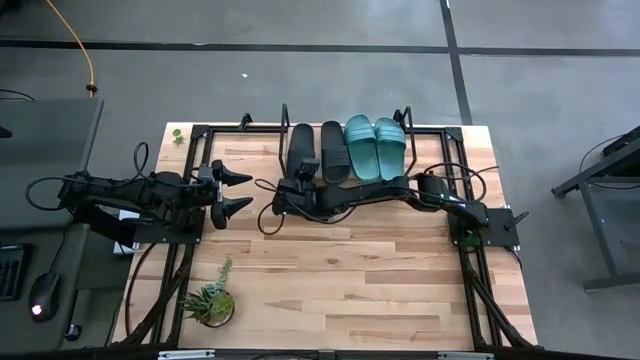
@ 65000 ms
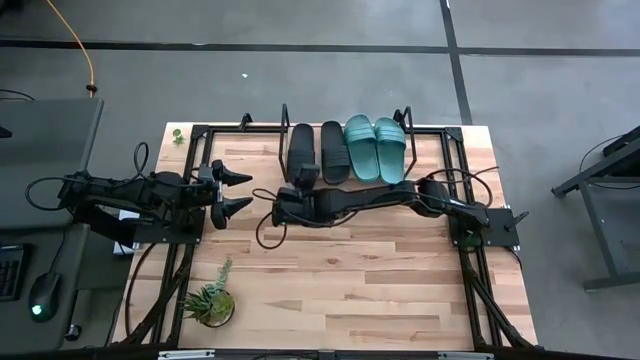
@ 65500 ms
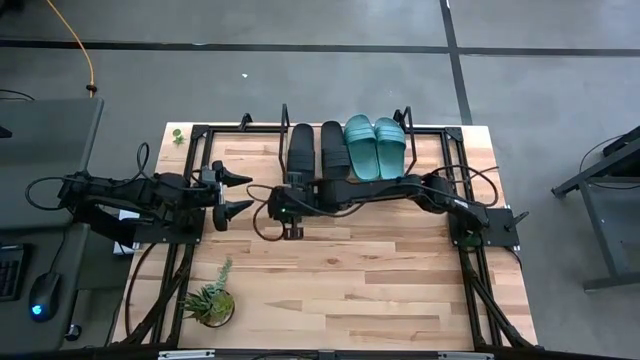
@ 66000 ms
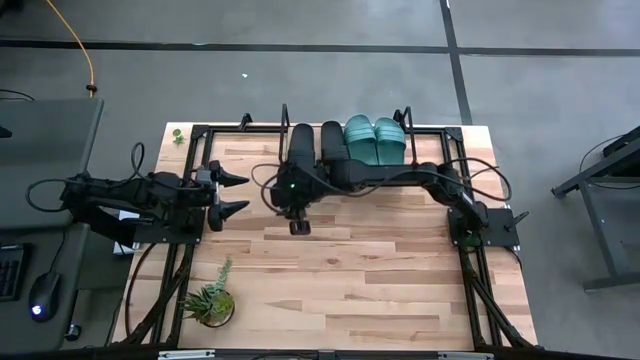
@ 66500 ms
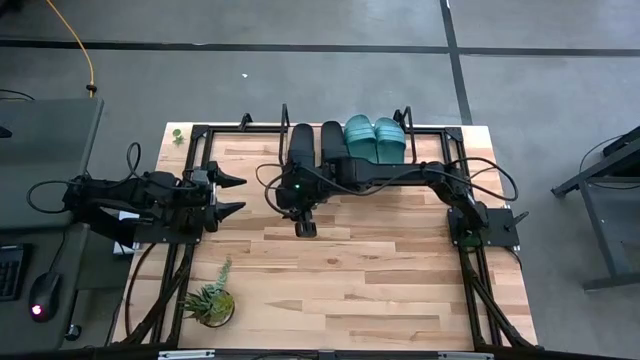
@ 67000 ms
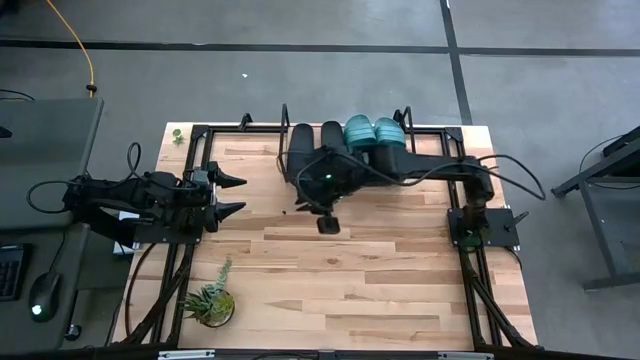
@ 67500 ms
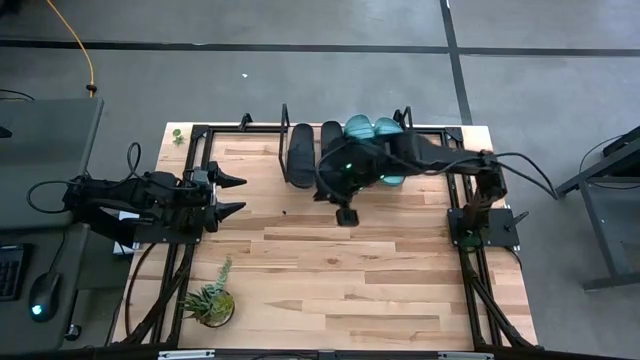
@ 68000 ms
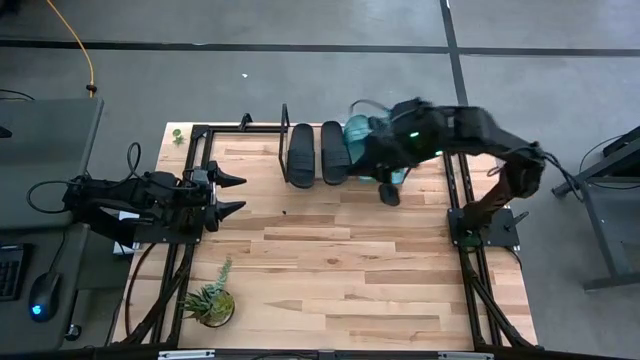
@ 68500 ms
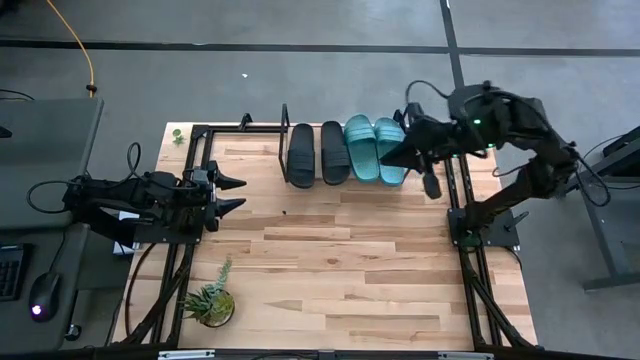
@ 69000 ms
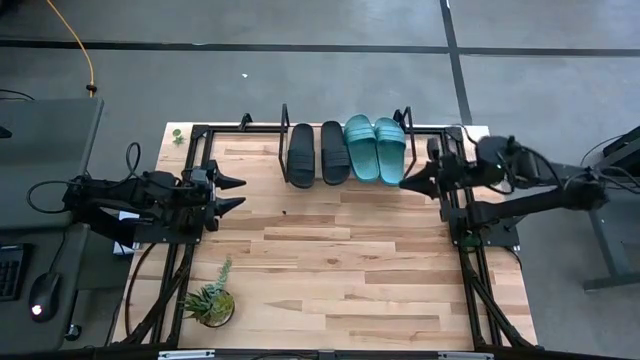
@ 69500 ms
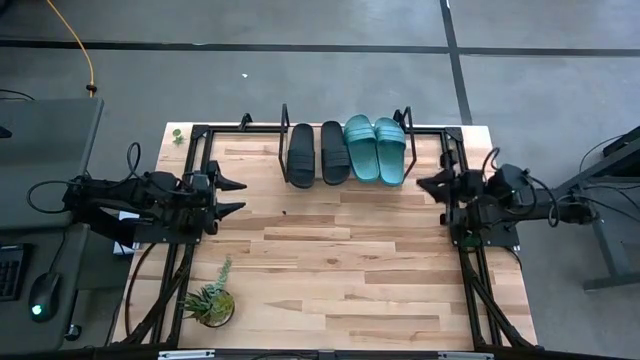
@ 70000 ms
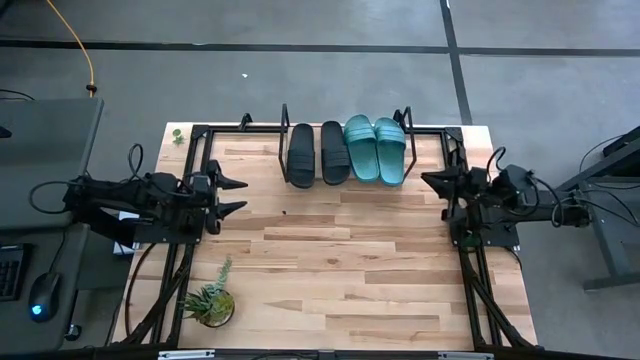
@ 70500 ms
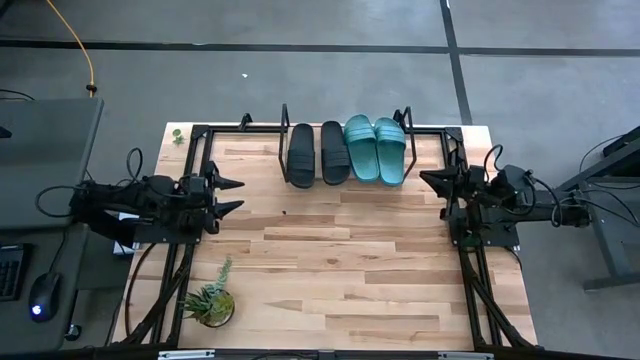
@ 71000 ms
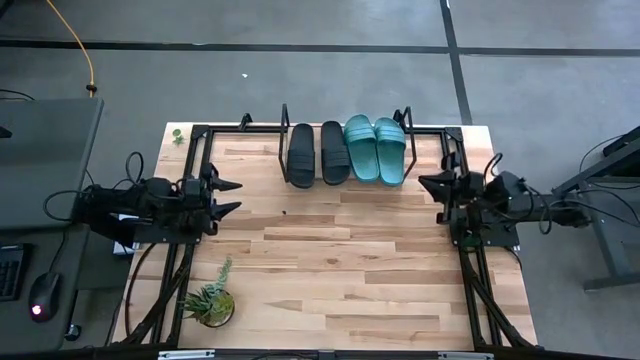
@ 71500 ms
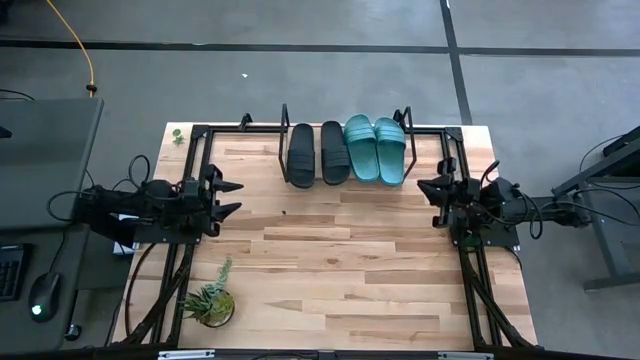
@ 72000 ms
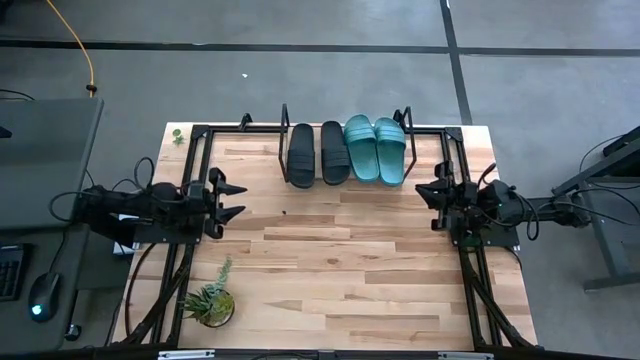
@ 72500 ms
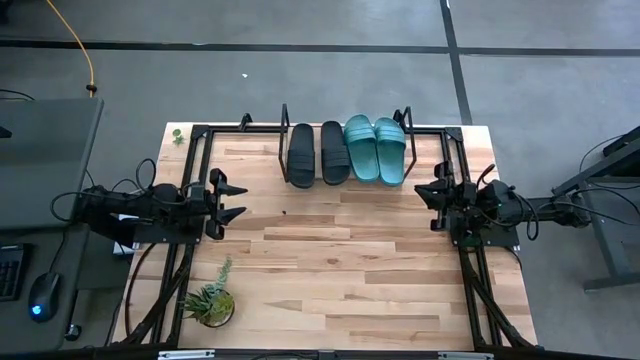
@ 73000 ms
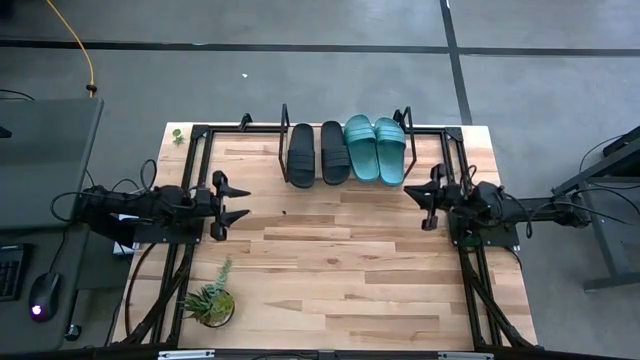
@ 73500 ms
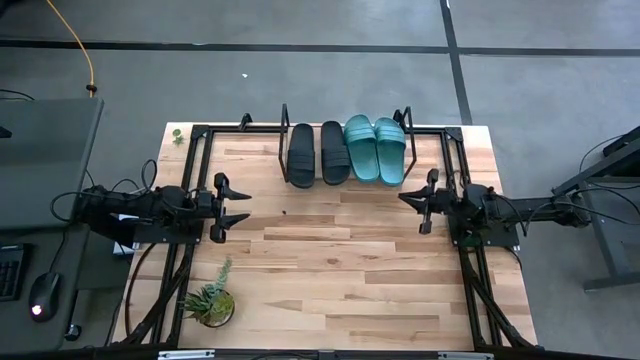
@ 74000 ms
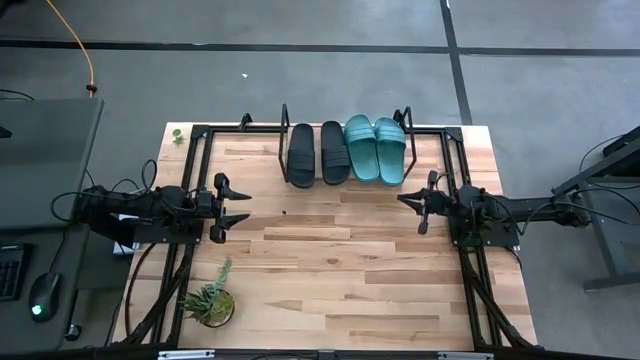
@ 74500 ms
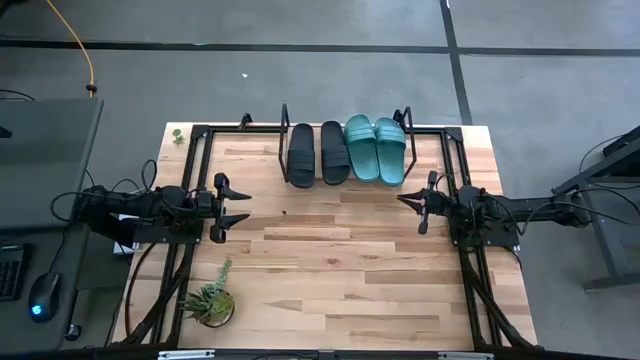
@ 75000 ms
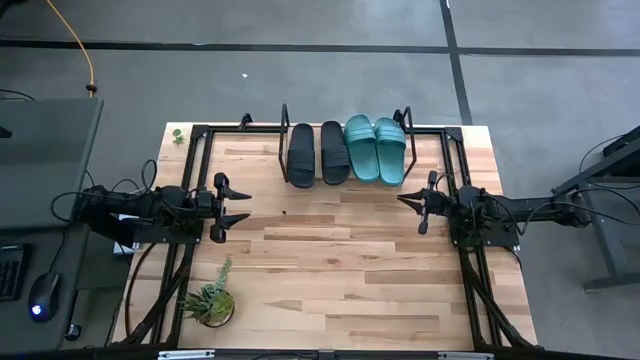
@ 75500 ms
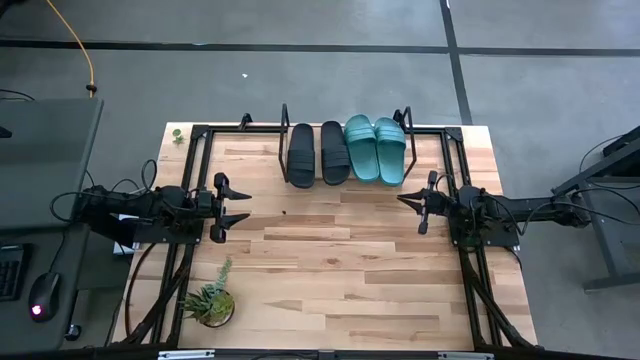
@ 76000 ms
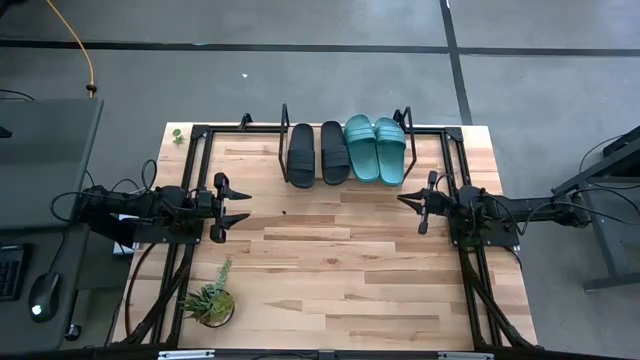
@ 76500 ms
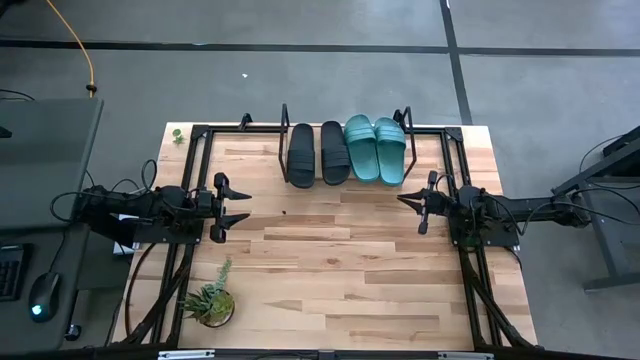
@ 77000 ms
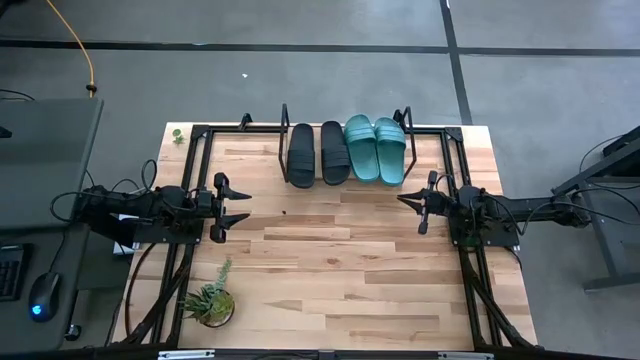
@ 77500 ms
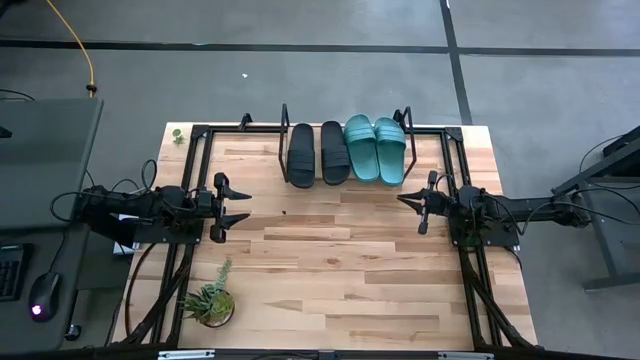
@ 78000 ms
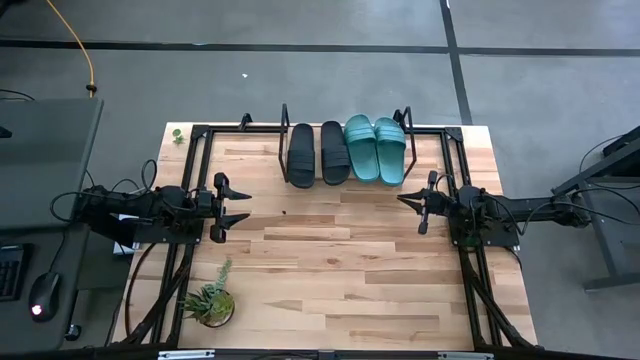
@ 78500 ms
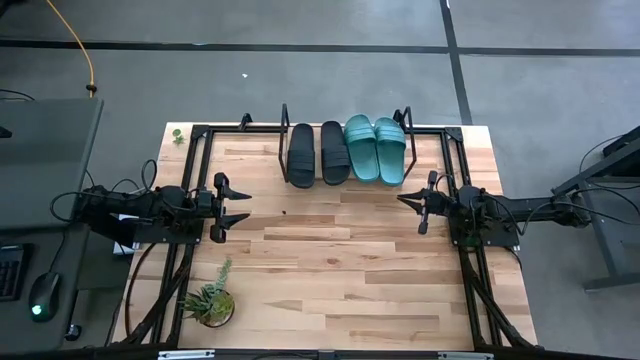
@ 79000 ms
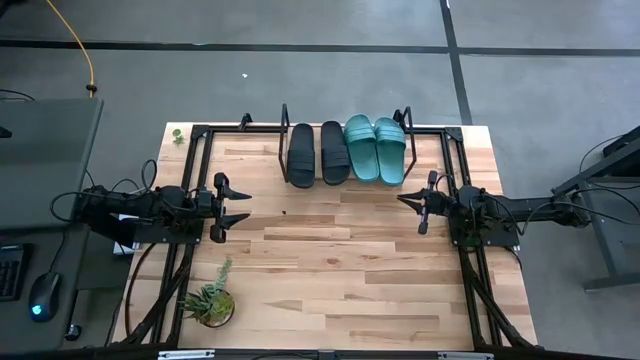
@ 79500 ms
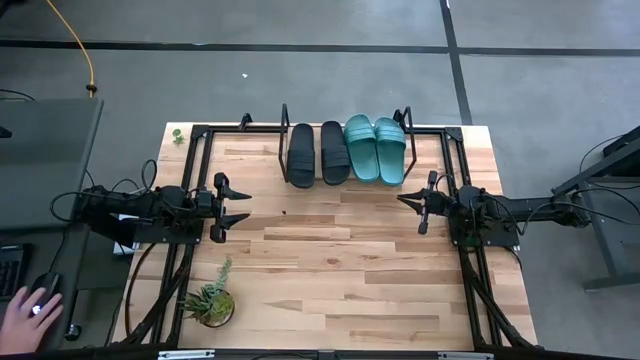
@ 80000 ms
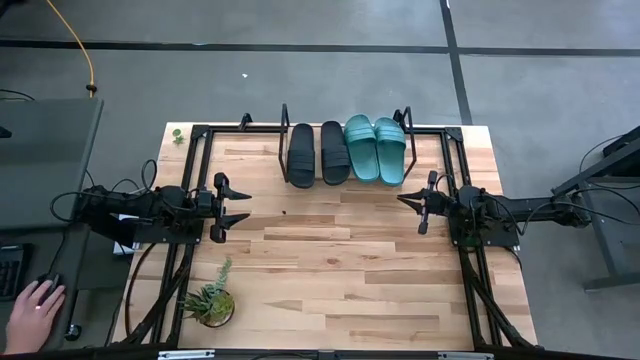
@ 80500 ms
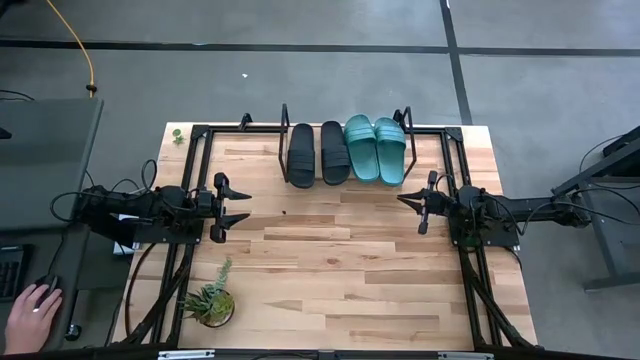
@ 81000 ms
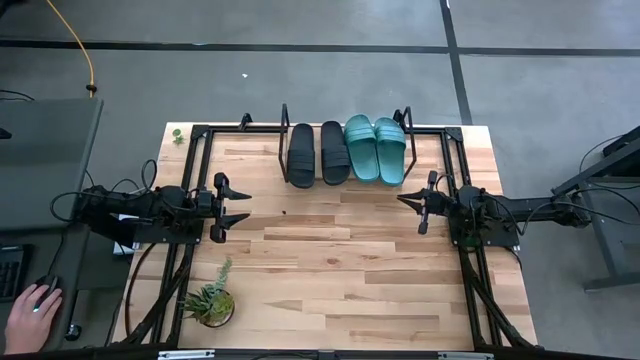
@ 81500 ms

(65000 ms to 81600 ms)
Task: Pick and place slides into the shelf
Return to Home Position

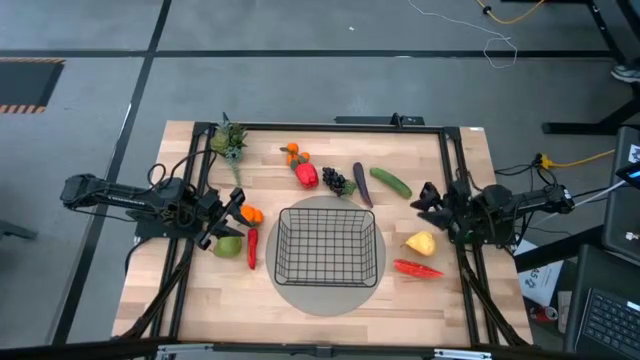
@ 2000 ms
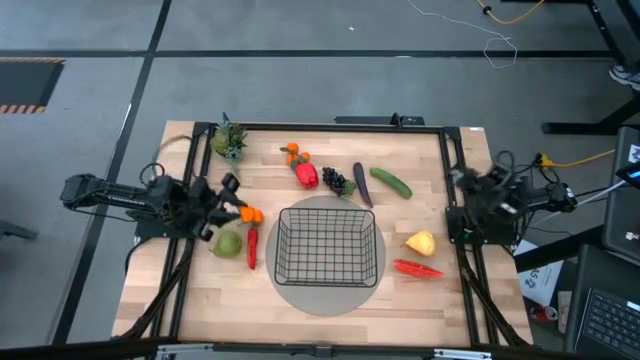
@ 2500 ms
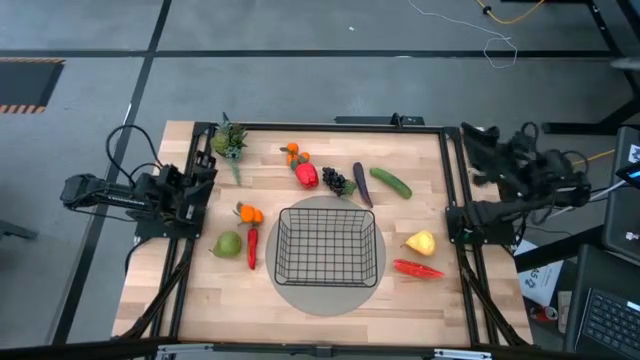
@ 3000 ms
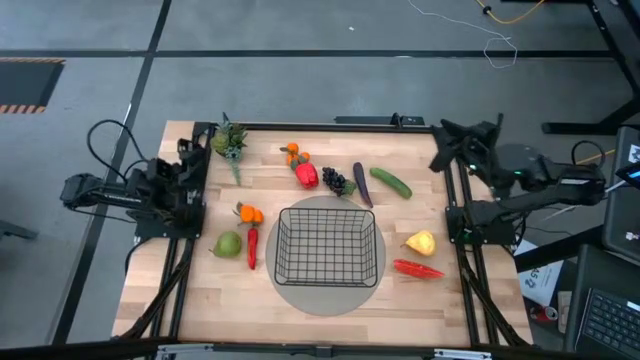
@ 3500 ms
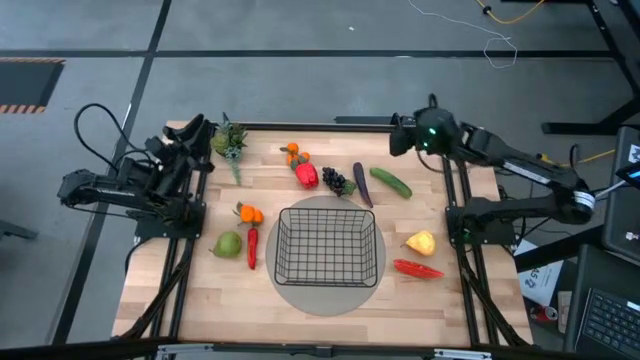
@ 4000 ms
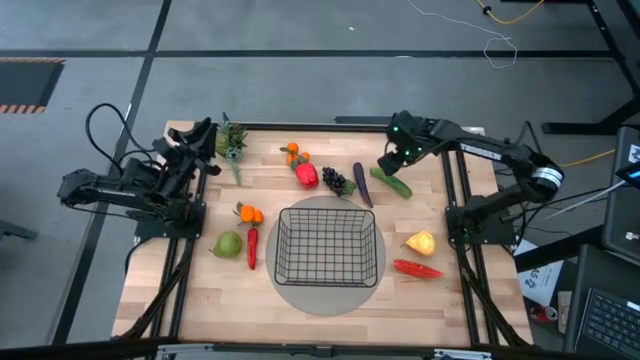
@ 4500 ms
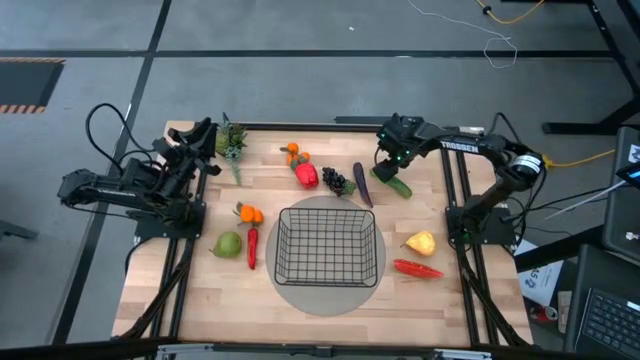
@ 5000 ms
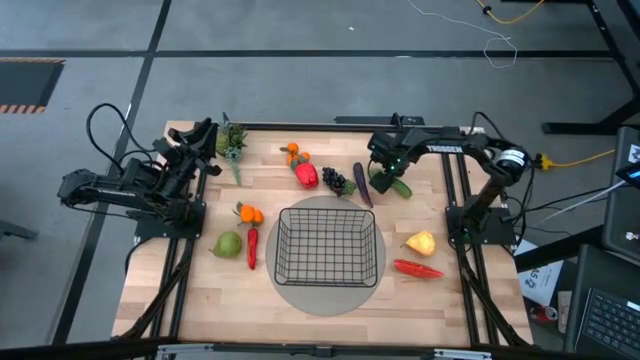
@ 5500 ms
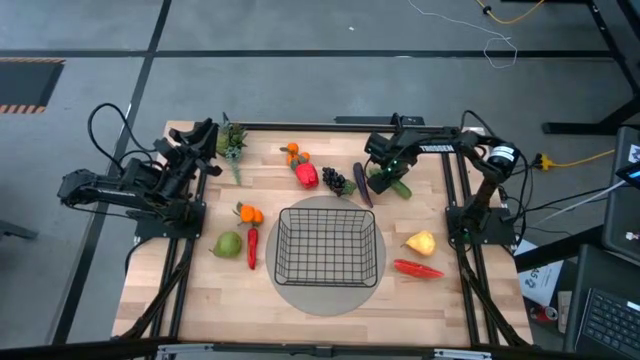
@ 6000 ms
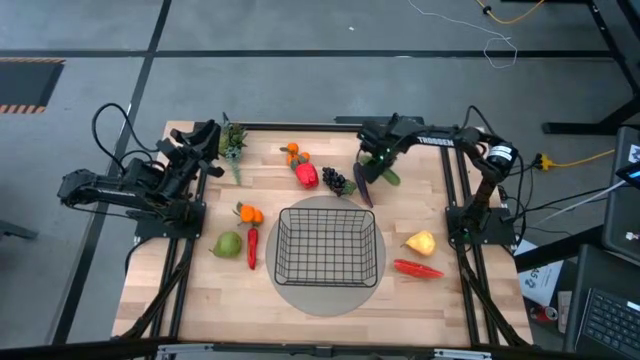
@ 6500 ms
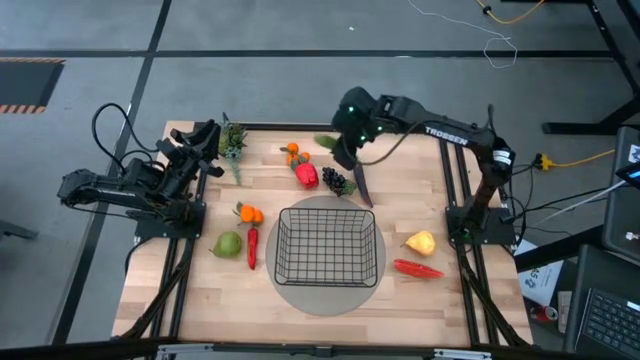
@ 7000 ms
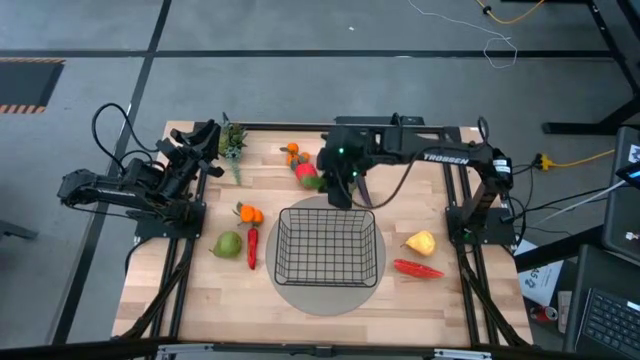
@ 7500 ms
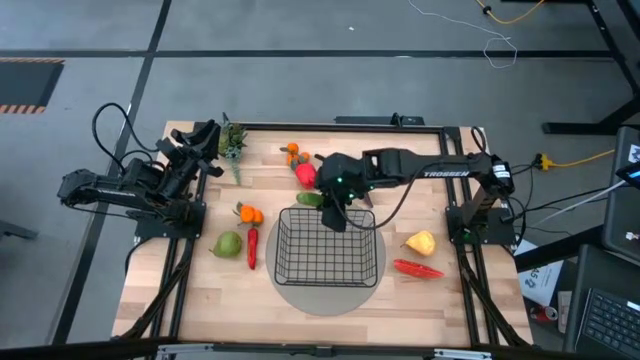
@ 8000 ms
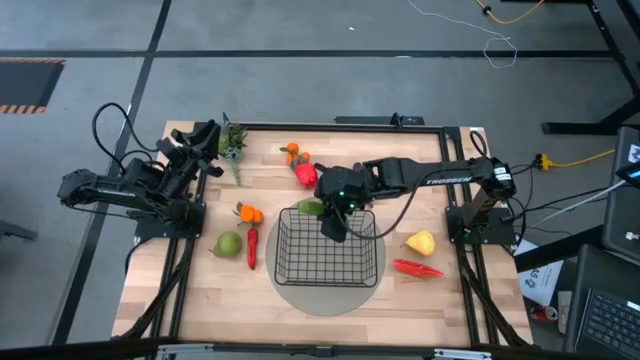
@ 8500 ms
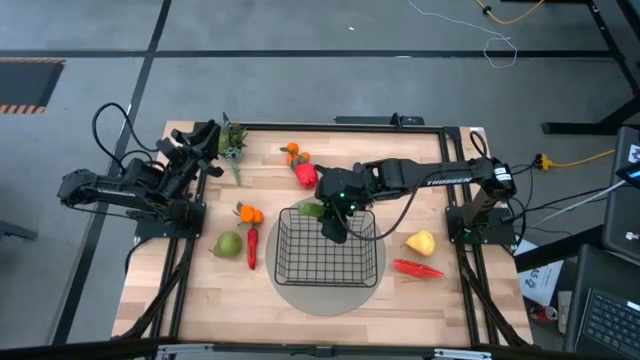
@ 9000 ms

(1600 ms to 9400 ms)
Task: Build produce basket
Put the green cucumber into the black wire basket
